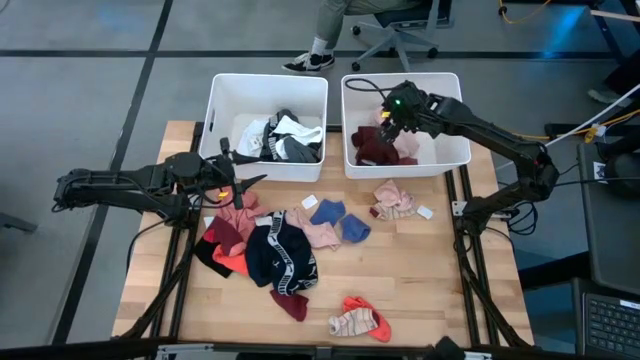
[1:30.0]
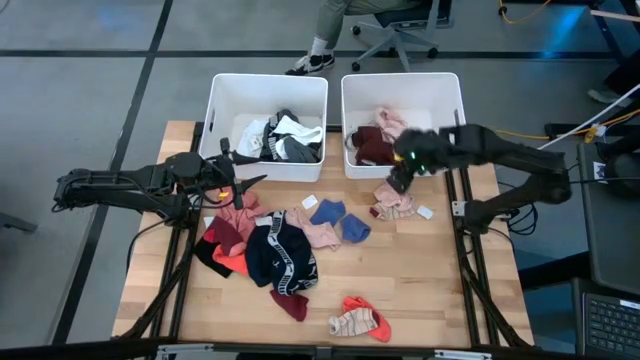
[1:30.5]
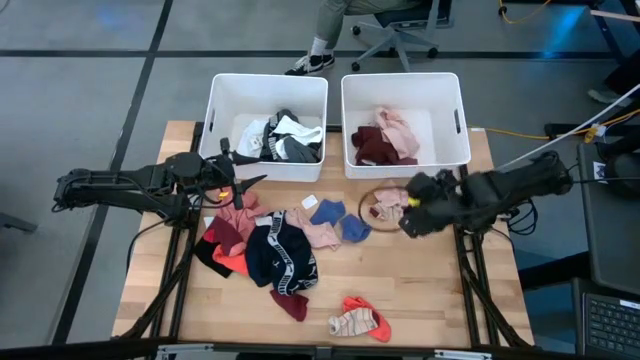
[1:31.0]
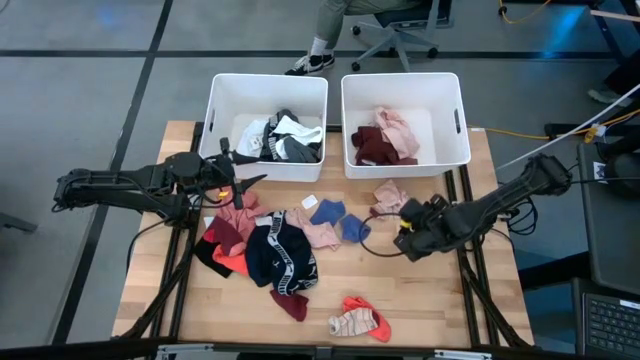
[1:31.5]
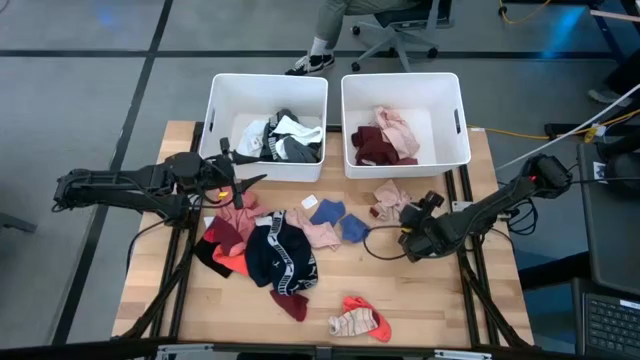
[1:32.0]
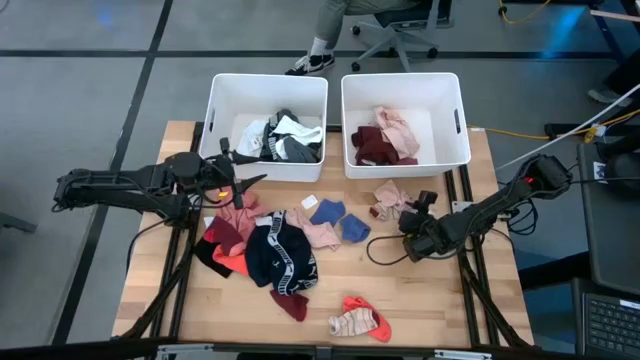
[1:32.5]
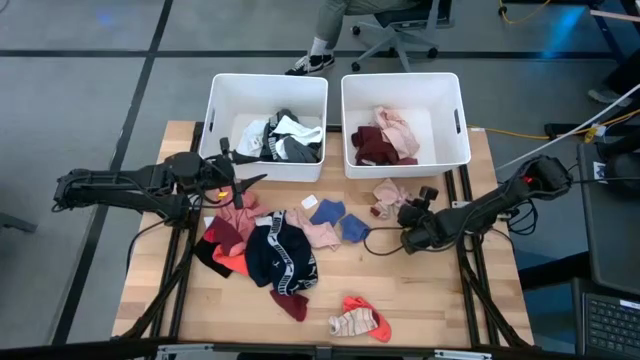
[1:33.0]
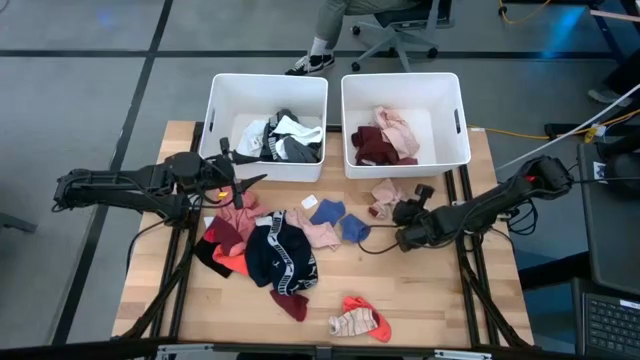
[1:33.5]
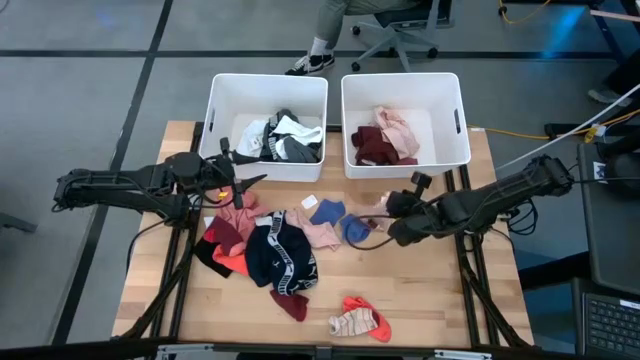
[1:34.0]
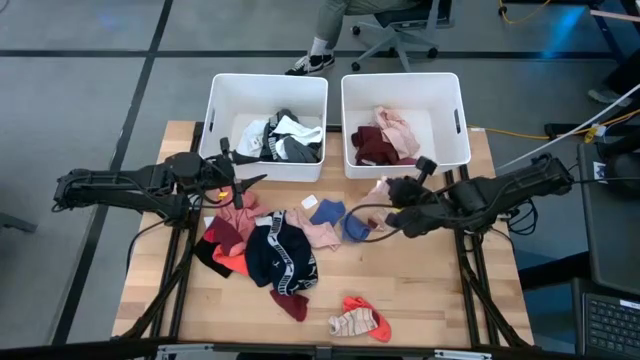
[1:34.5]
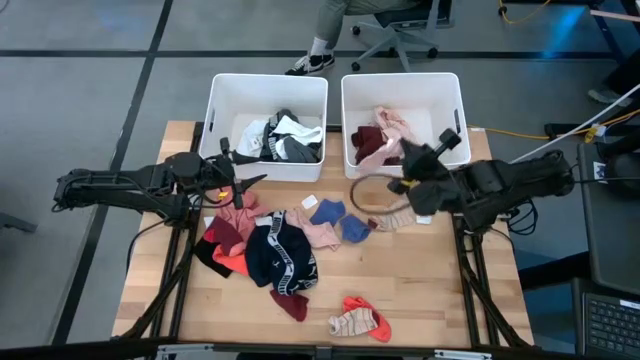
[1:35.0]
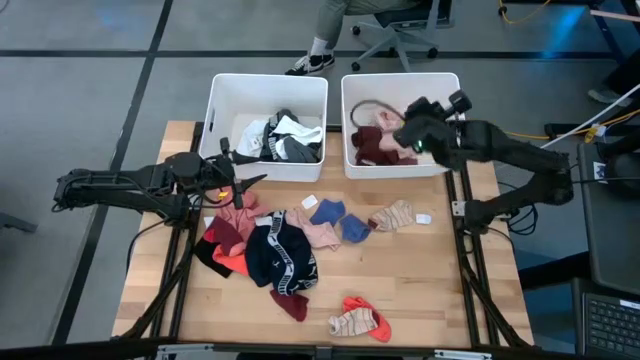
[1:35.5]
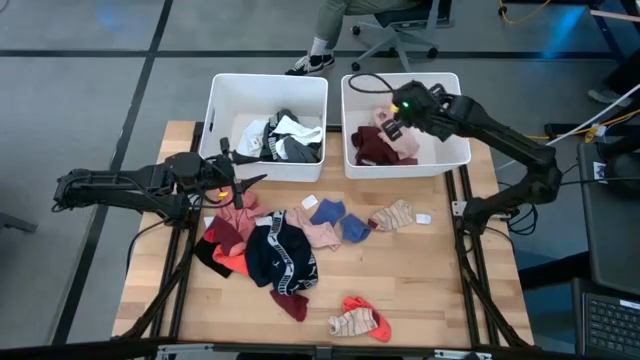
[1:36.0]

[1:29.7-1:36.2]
Task: Sort clothes
Put the right peach sock into the right white laundry bin

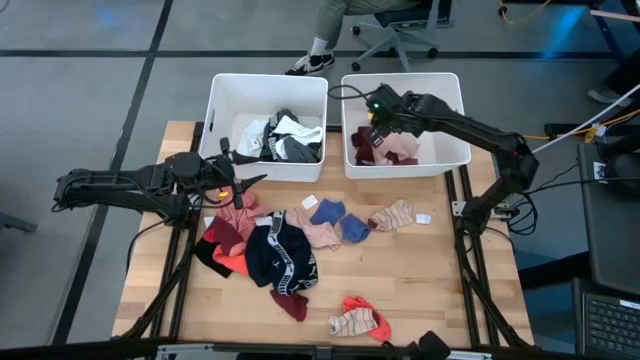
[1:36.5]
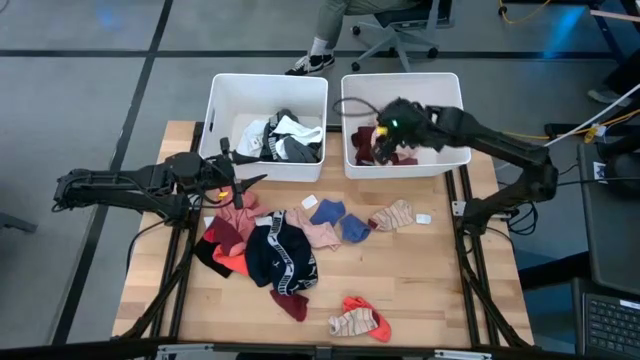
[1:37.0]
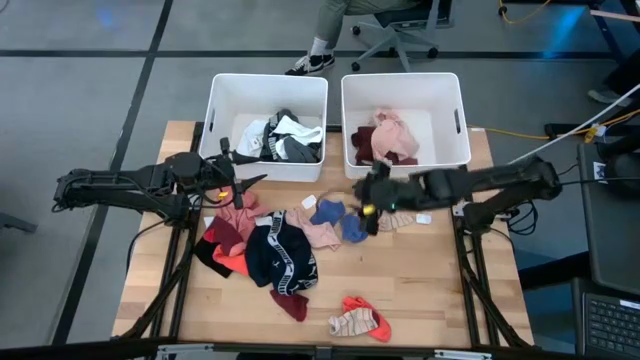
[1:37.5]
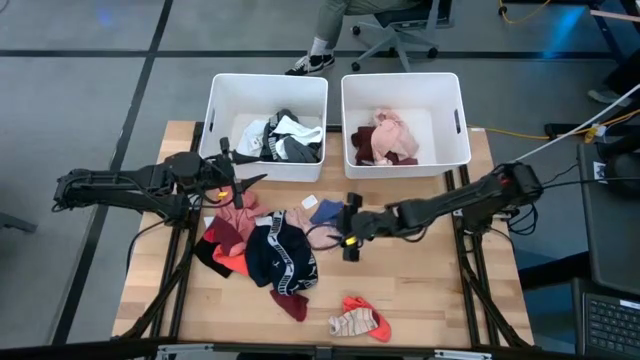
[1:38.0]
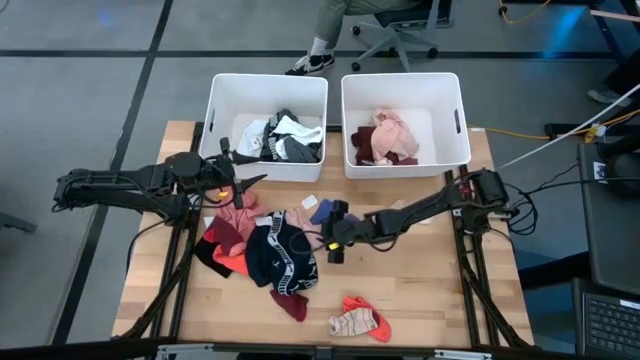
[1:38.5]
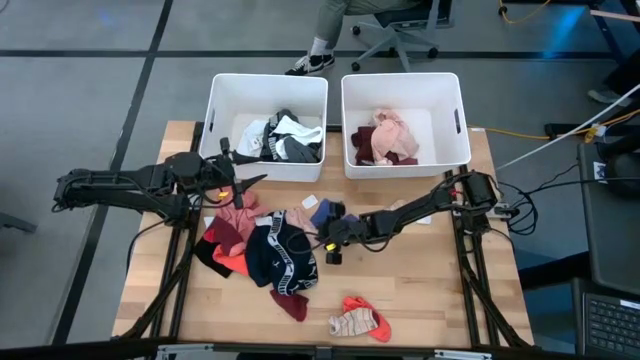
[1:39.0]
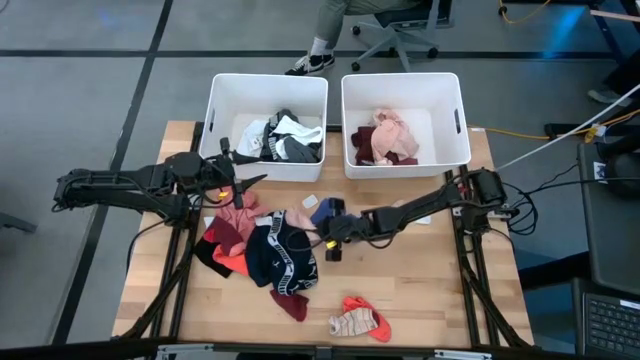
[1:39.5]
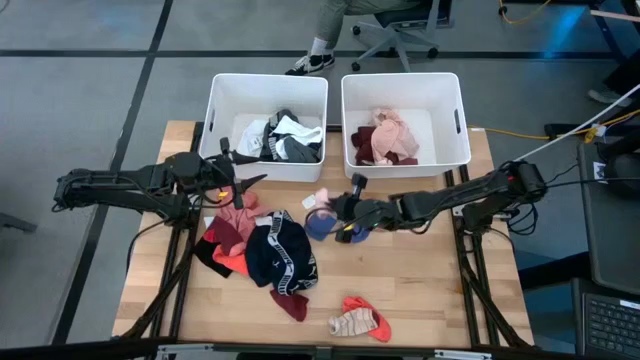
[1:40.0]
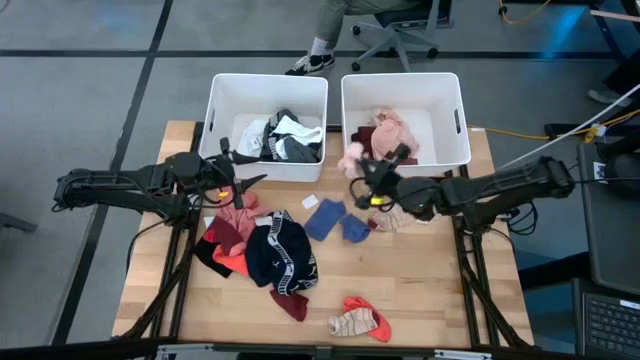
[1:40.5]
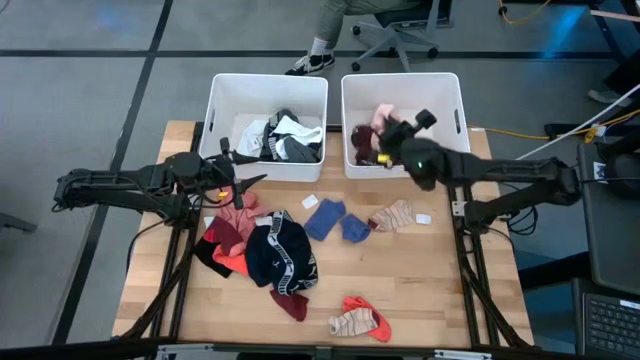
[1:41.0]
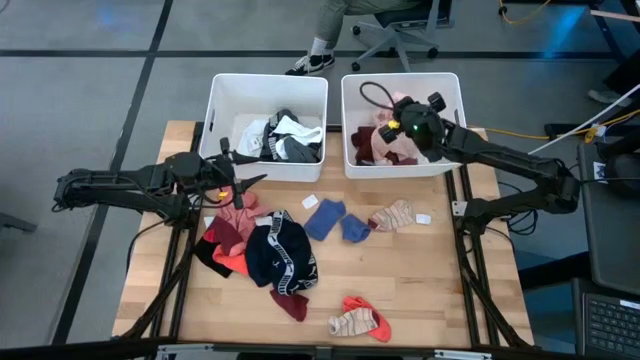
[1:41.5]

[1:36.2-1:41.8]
Put the peach sock into the right white laundry bin

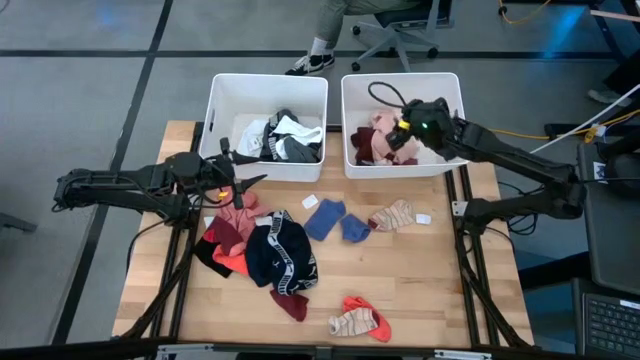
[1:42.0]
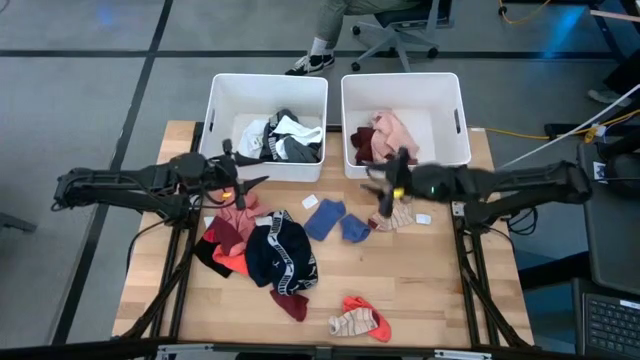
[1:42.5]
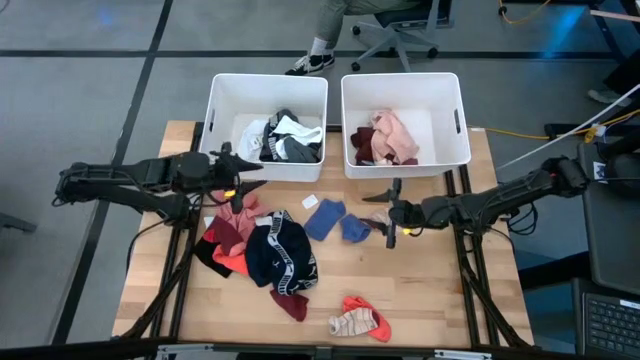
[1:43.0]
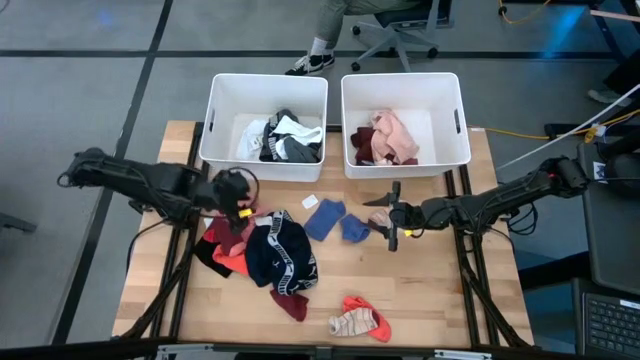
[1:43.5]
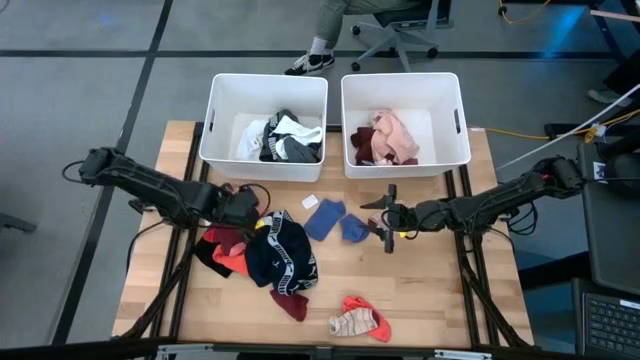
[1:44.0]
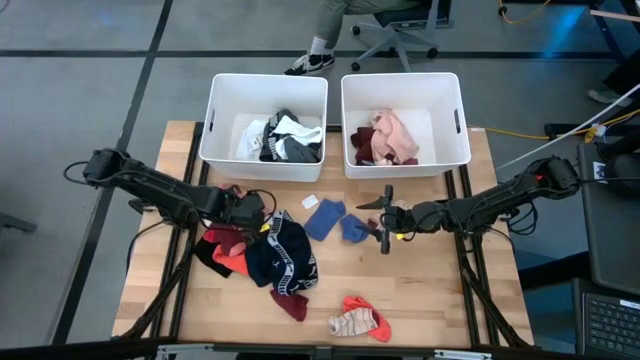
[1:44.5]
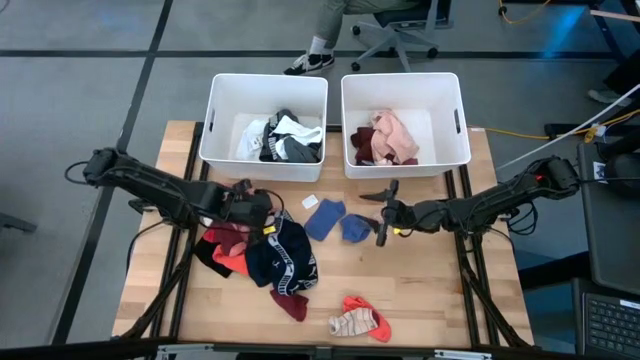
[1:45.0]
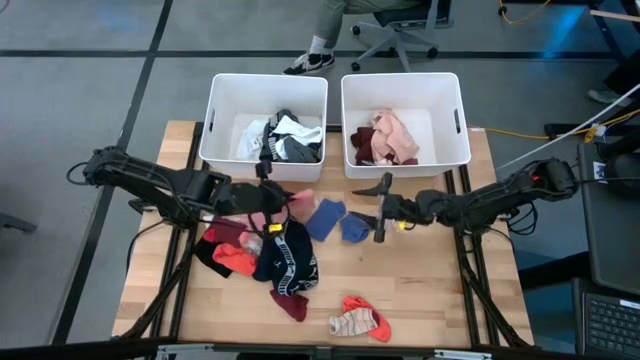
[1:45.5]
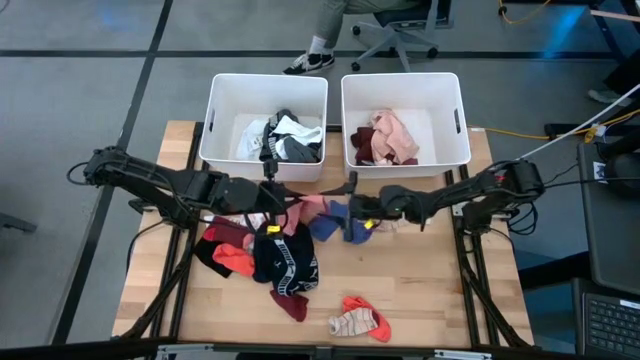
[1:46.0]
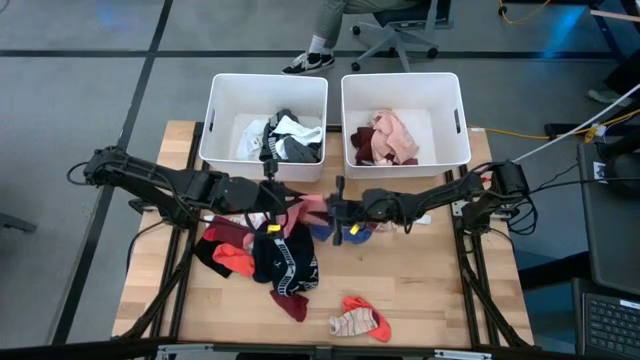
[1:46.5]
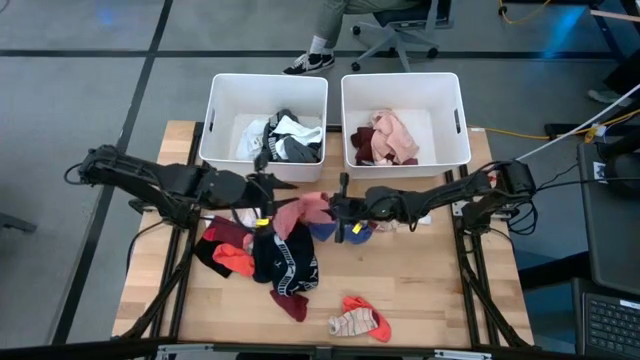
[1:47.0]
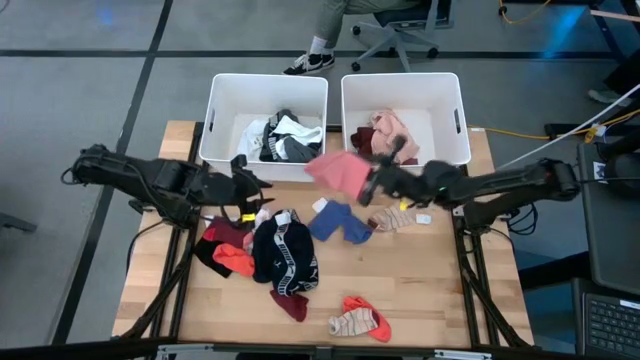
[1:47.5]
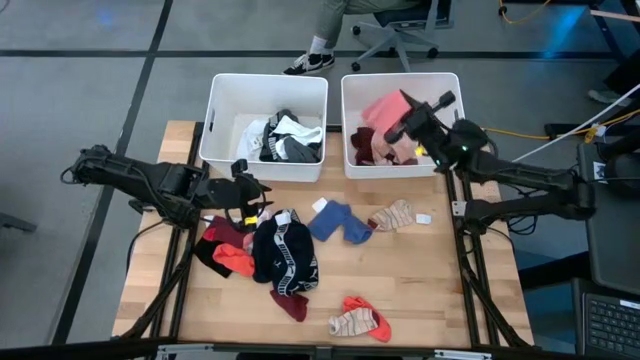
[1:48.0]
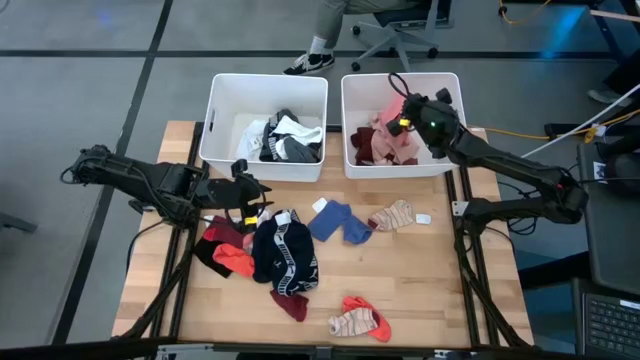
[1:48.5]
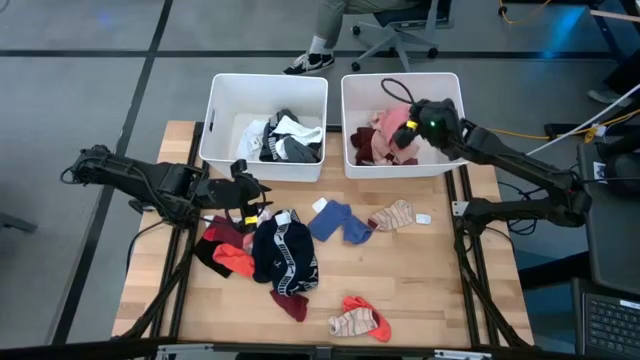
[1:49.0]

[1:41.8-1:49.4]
Put the pink tube top into the right white laundry bin
